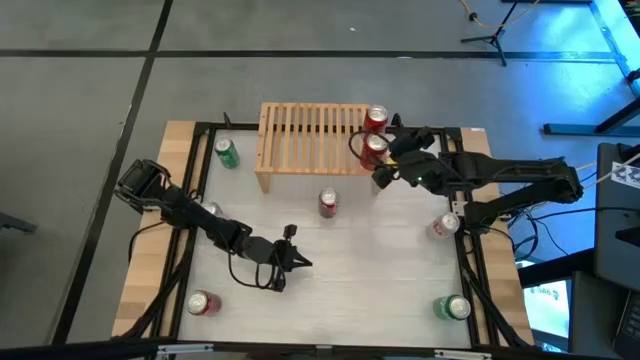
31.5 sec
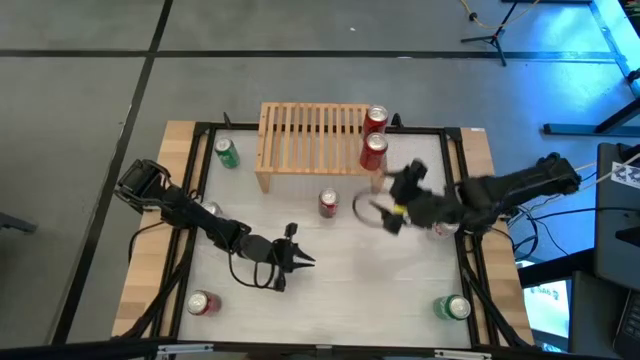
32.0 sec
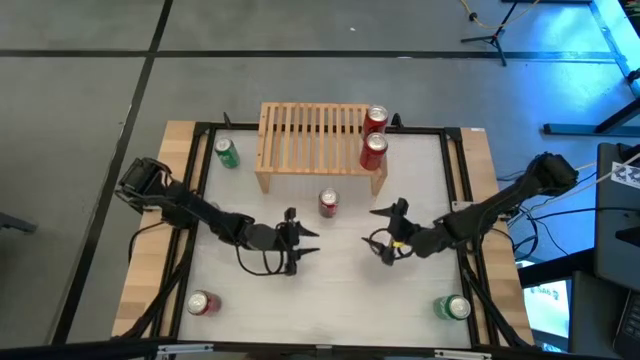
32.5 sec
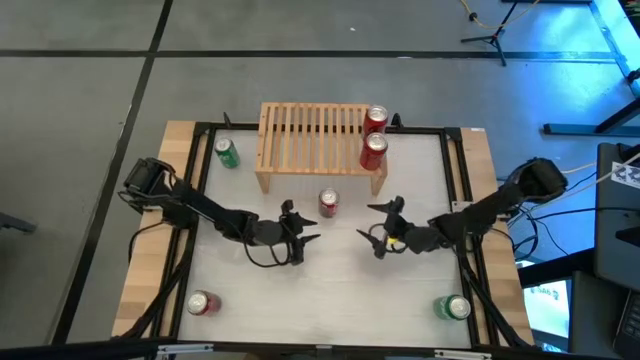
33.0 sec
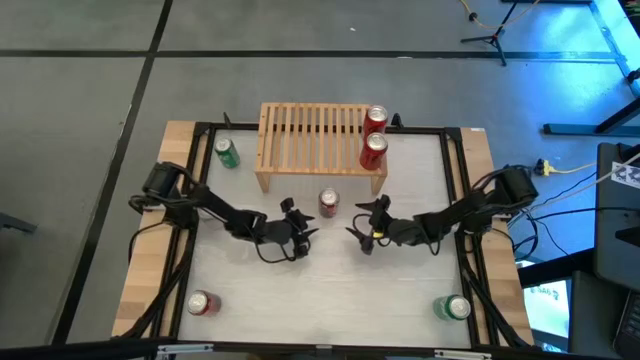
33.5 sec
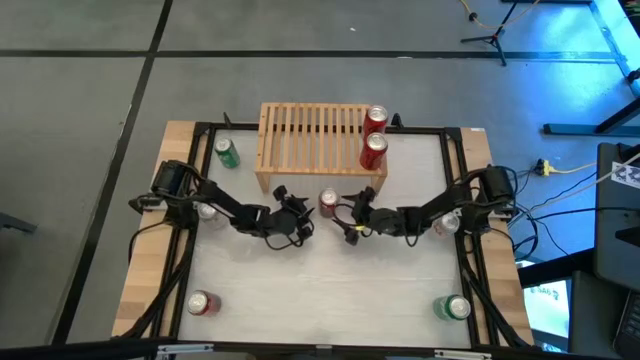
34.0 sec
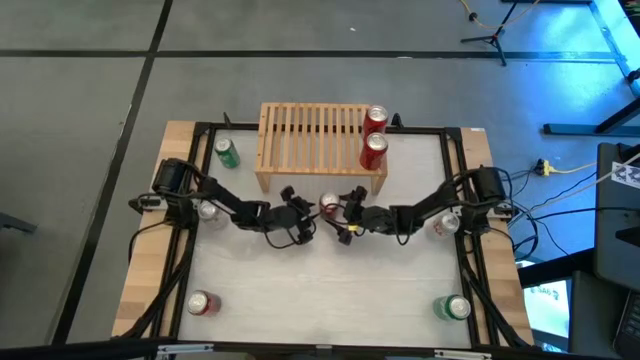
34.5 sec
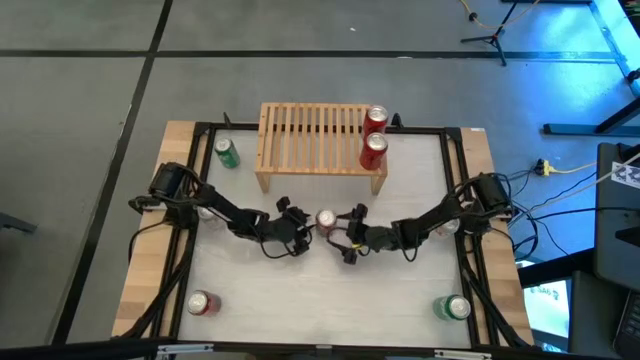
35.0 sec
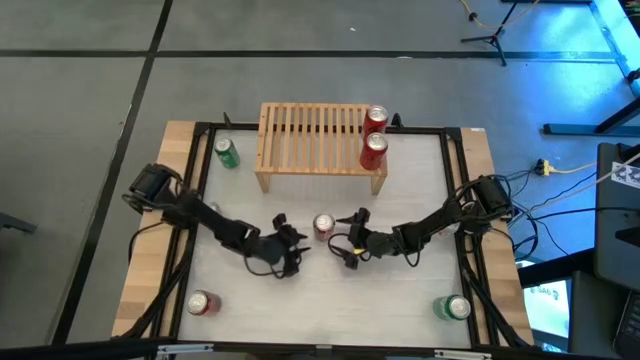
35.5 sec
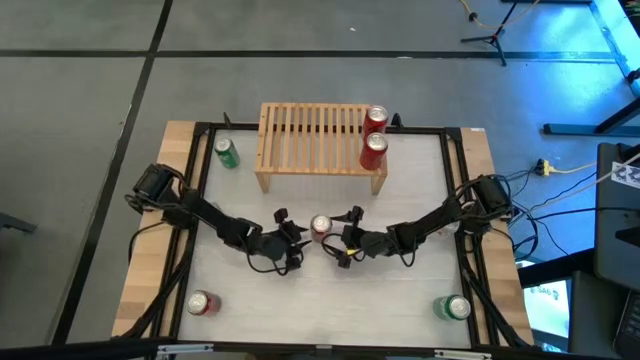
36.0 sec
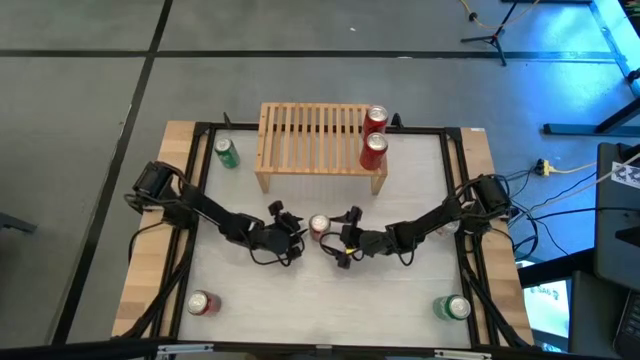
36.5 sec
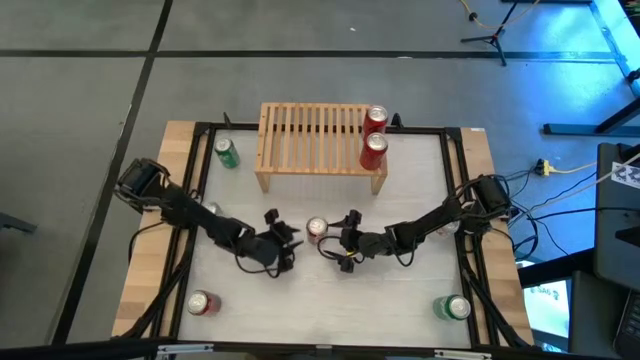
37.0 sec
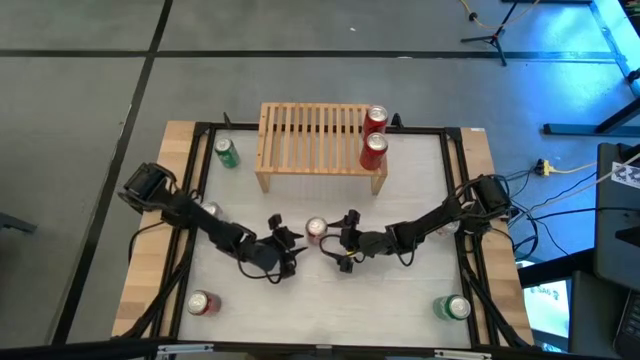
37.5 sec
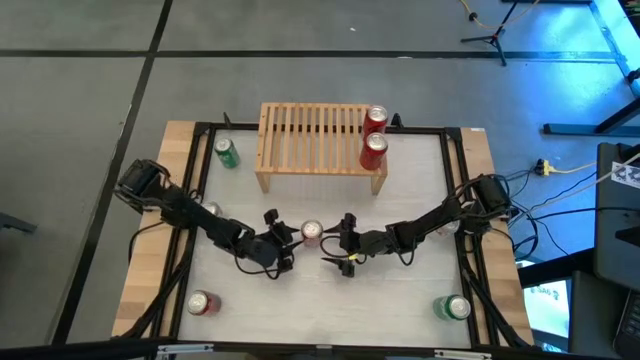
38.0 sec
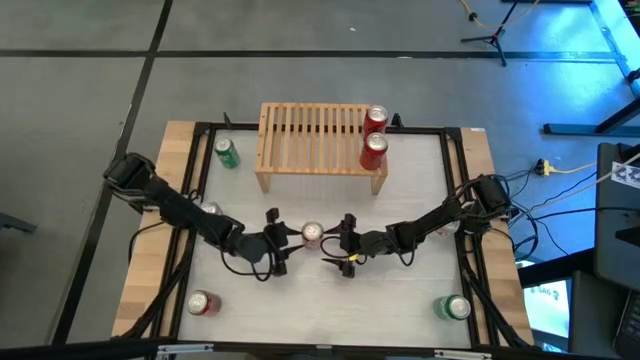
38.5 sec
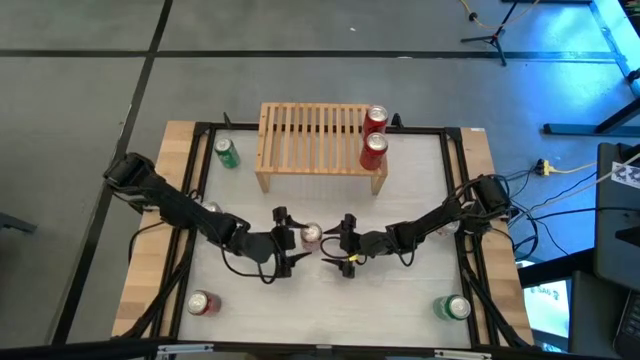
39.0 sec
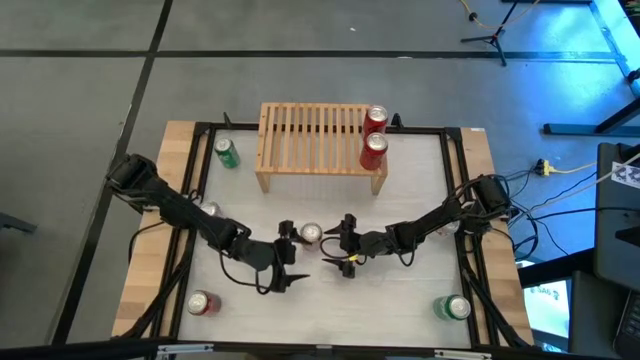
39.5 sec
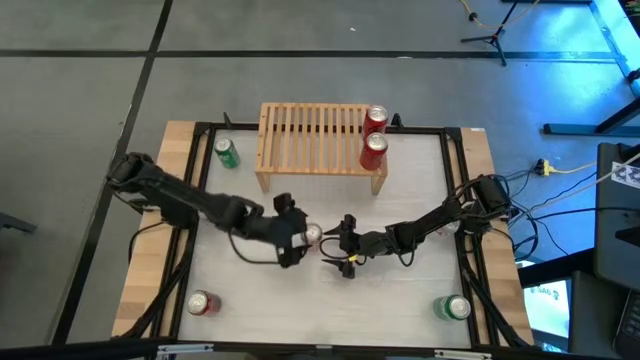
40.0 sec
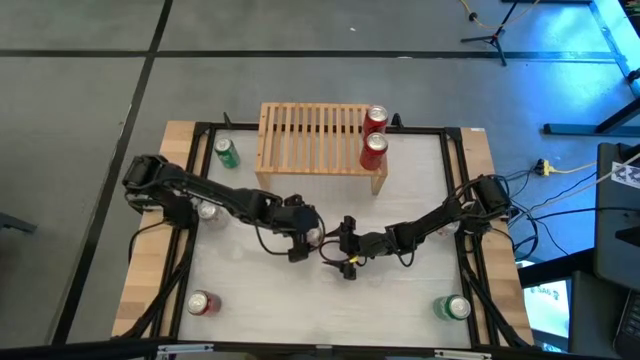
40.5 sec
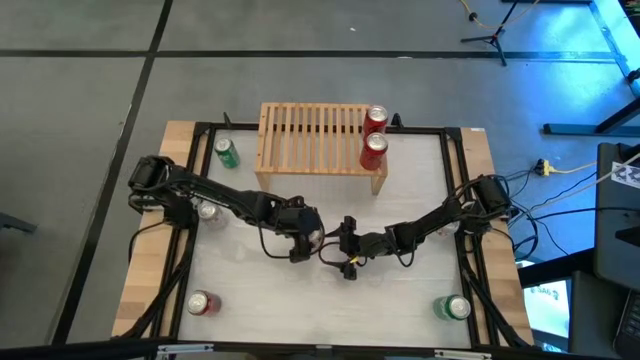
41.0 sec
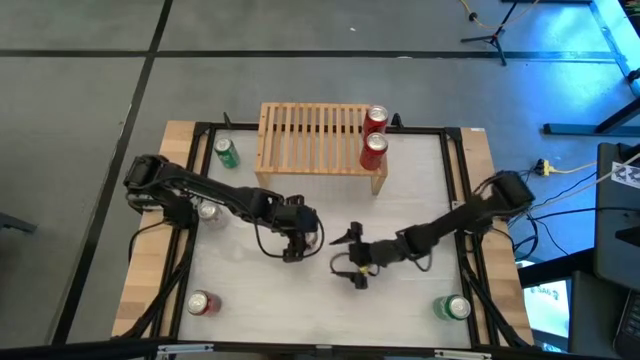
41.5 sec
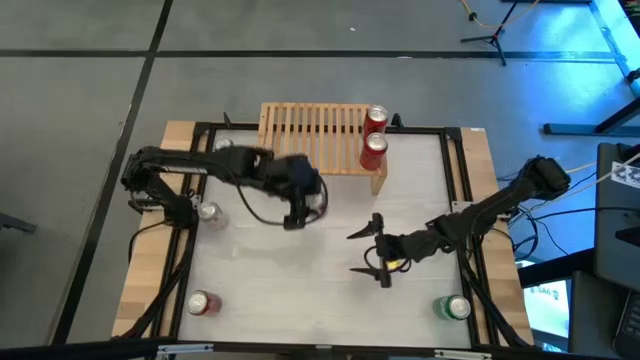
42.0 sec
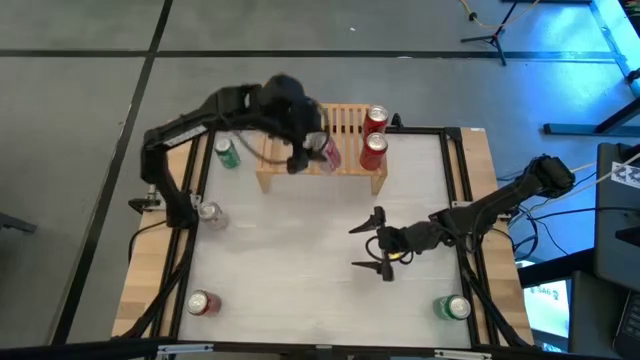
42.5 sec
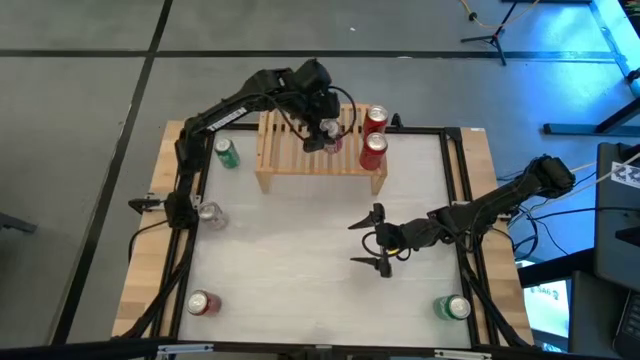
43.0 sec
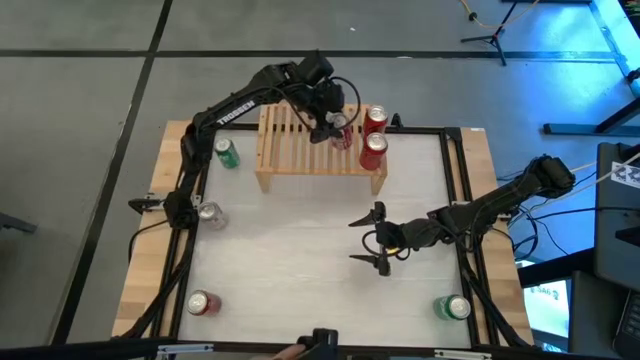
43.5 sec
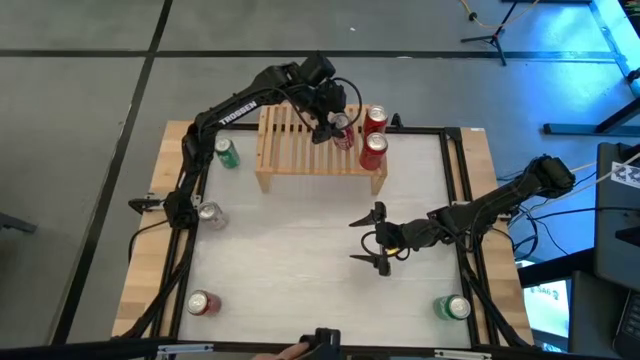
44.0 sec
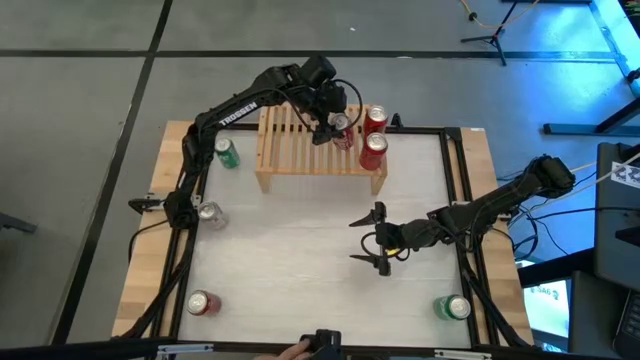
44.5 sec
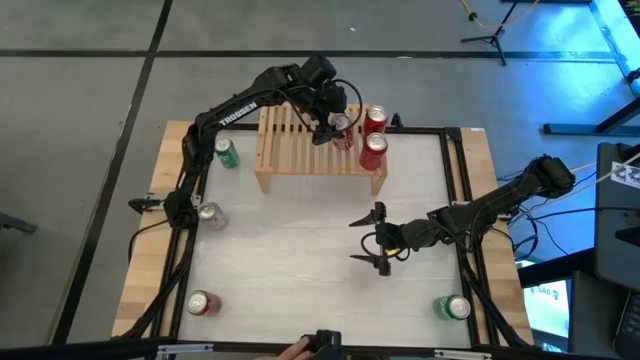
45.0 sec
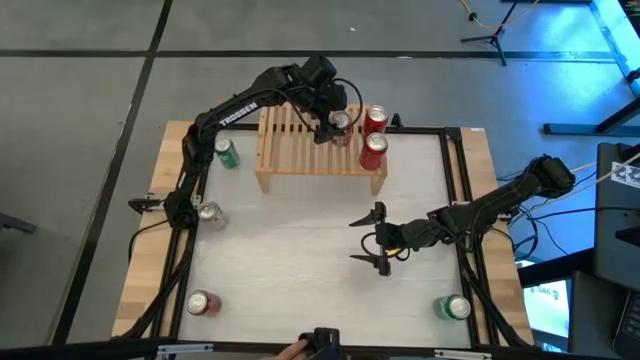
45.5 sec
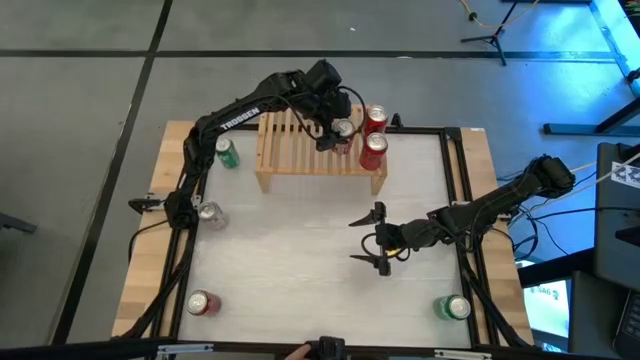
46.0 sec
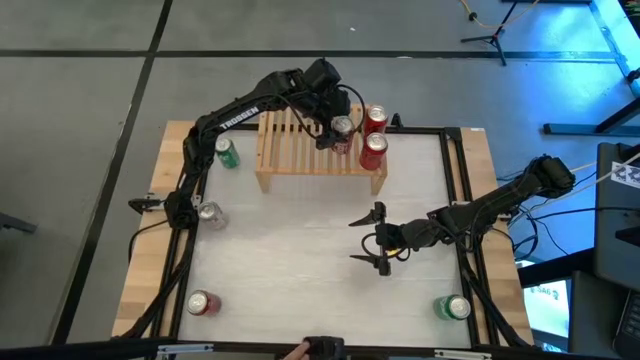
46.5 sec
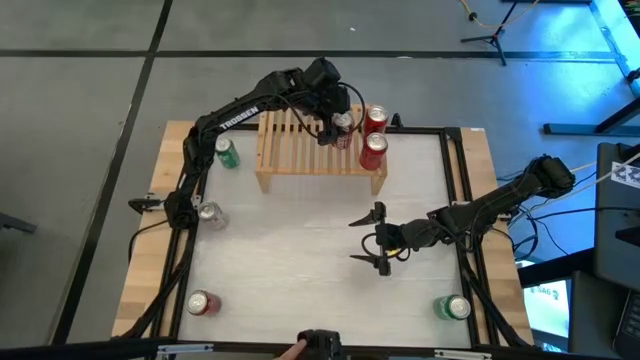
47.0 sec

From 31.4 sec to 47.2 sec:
Task: Place canned beverage on shelf
Put the top red white soda can on the shelf

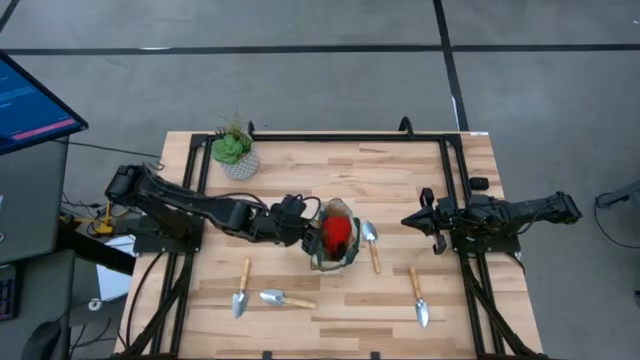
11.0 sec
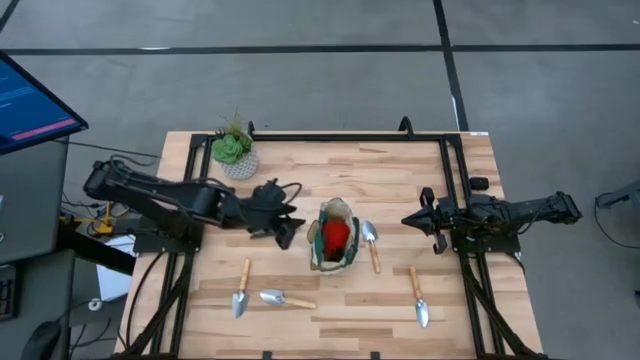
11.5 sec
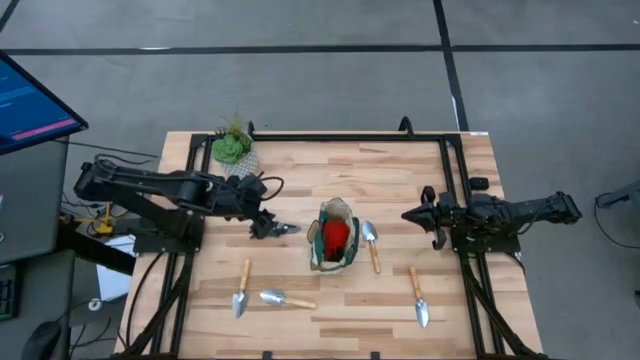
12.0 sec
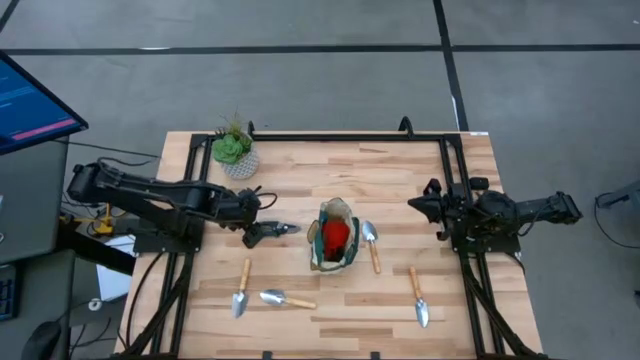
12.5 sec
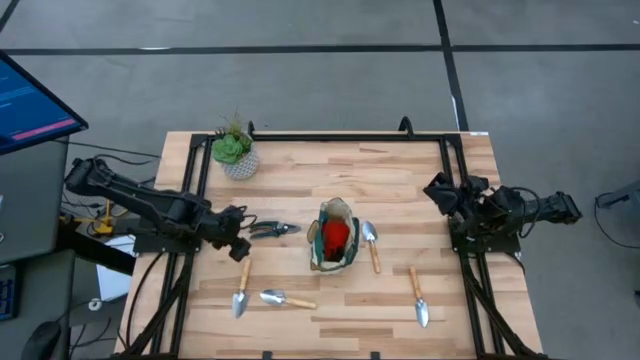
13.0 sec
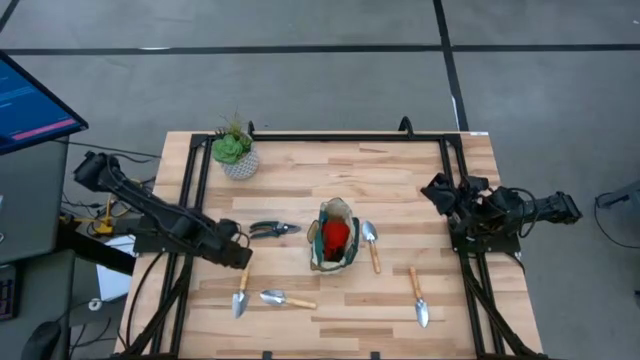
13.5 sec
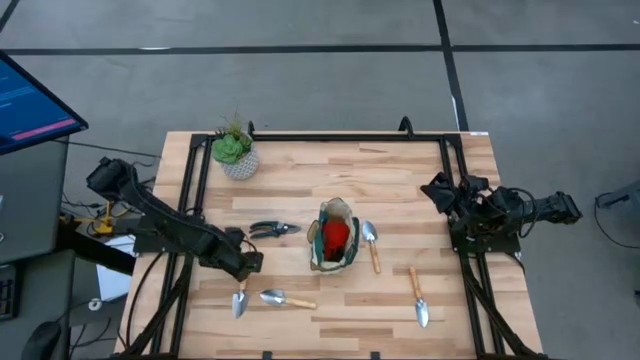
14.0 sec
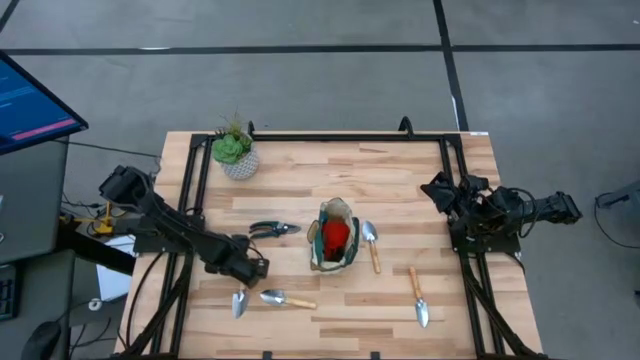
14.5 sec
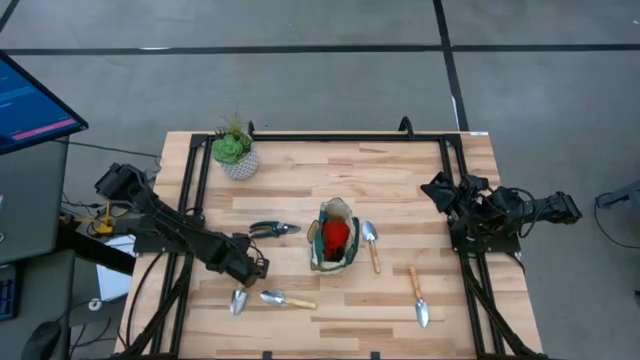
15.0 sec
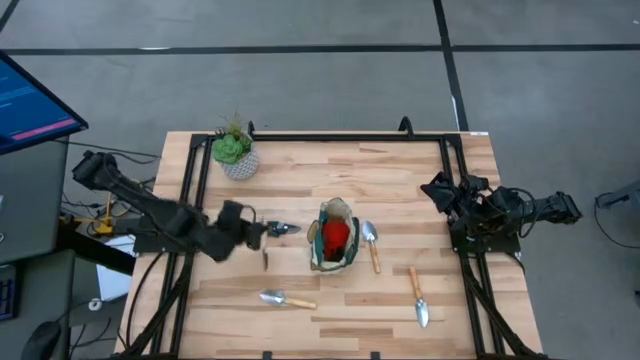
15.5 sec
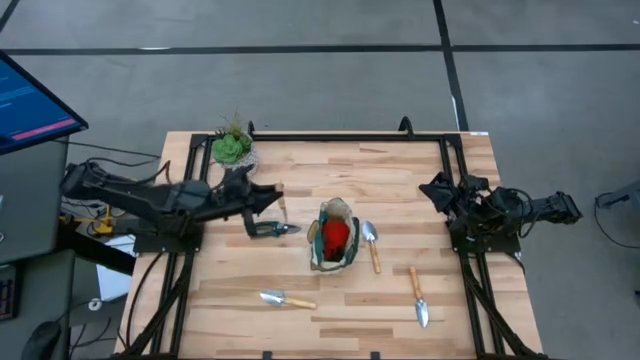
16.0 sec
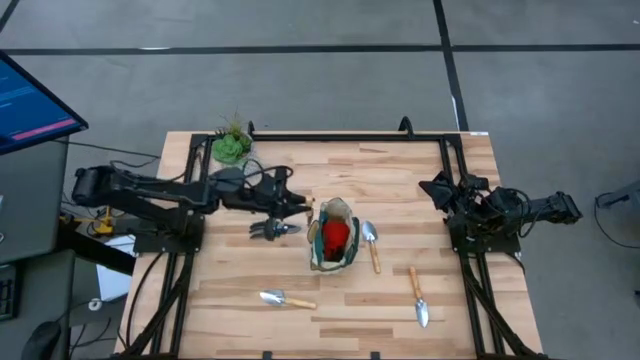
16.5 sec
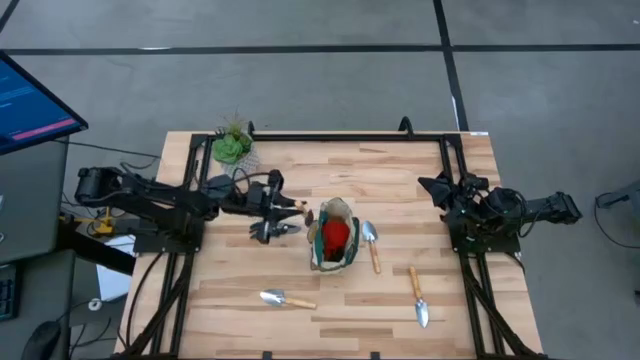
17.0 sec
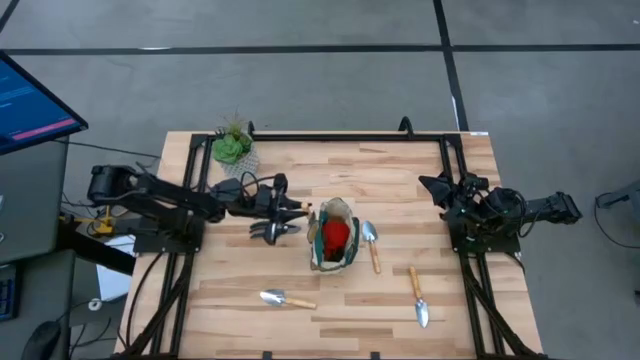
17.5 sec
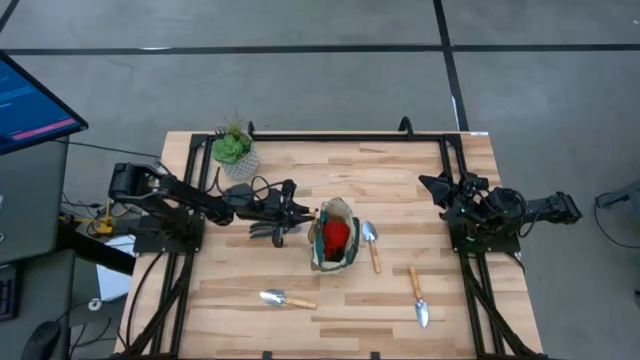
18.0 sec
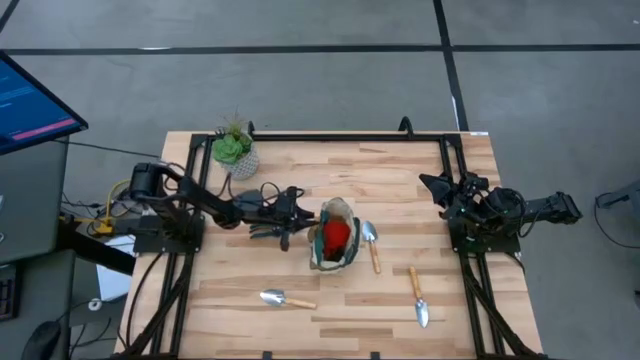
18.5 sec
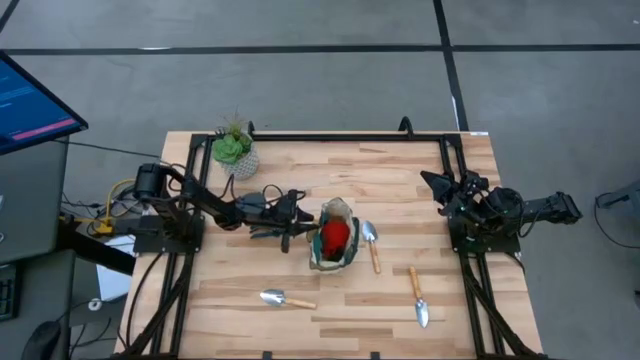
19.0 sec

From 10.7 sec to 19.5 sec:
Task: Pick & Place Garden tools in Gardening bag
Put the trowel into the gardening bag
